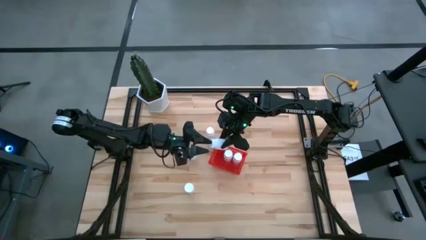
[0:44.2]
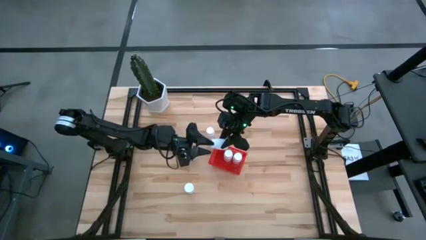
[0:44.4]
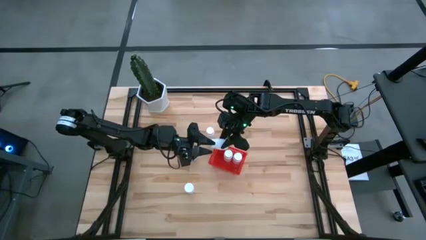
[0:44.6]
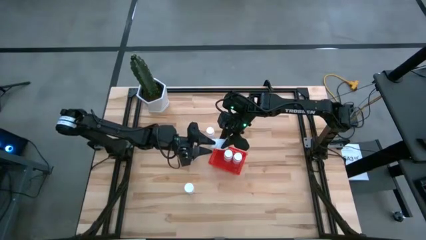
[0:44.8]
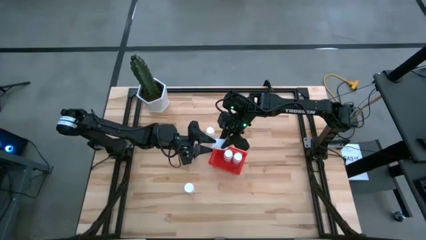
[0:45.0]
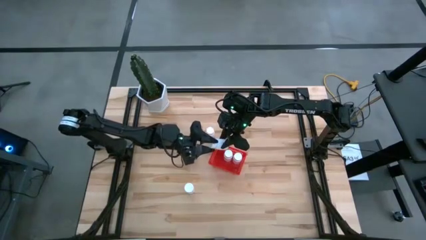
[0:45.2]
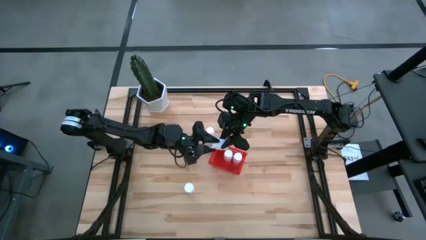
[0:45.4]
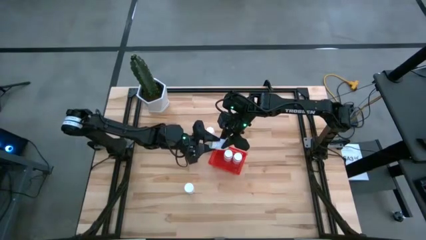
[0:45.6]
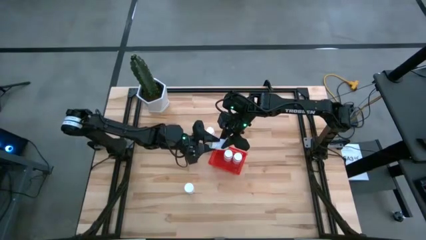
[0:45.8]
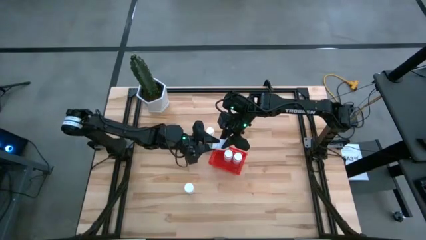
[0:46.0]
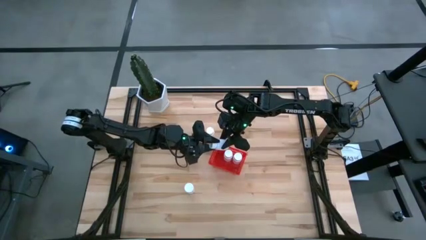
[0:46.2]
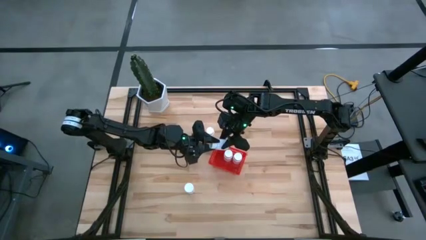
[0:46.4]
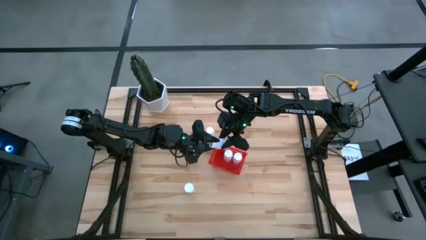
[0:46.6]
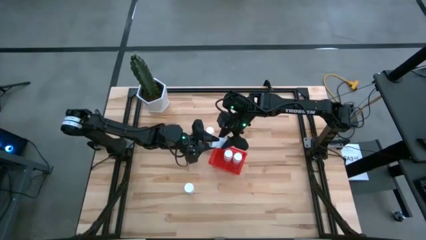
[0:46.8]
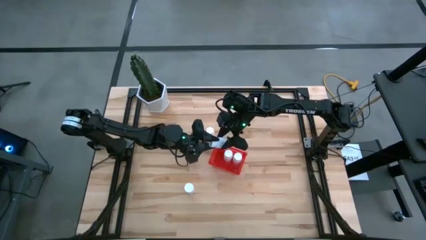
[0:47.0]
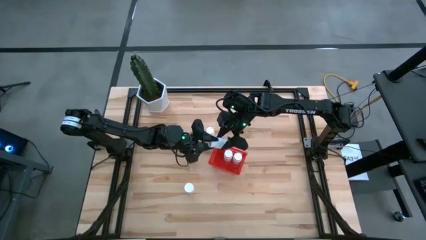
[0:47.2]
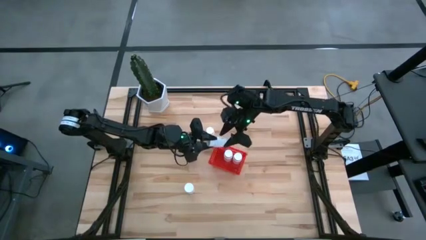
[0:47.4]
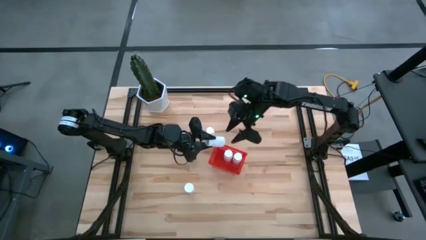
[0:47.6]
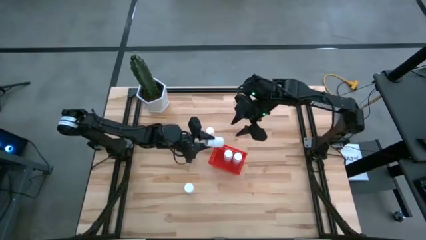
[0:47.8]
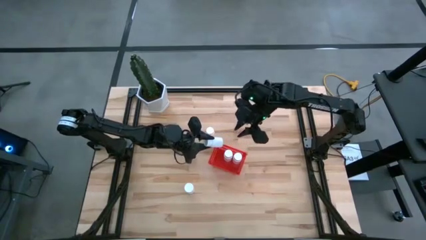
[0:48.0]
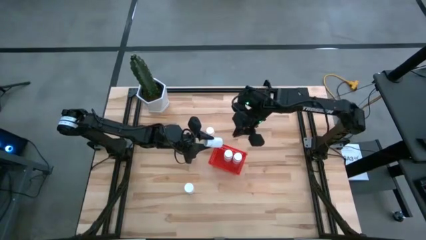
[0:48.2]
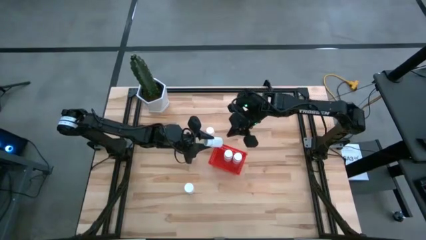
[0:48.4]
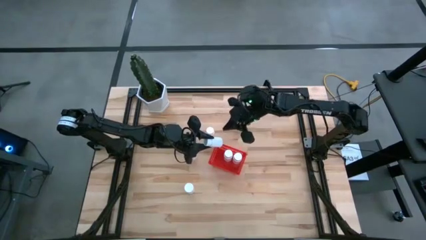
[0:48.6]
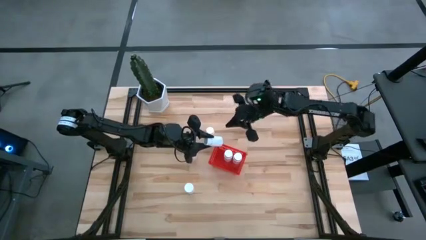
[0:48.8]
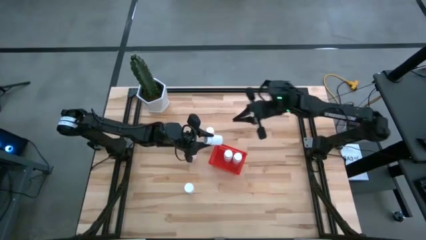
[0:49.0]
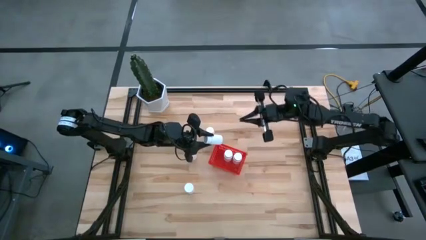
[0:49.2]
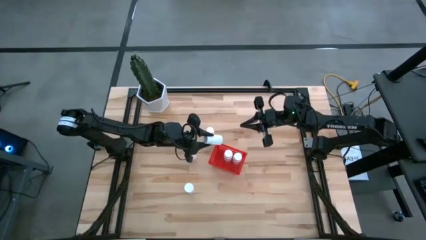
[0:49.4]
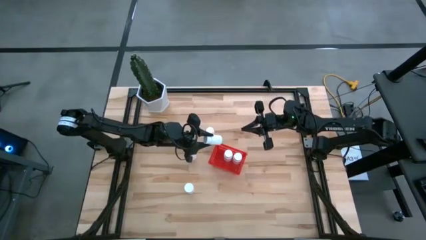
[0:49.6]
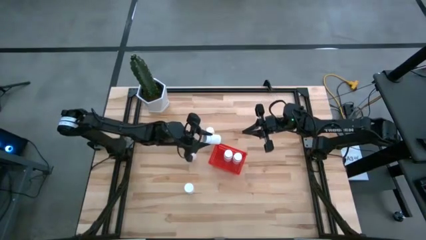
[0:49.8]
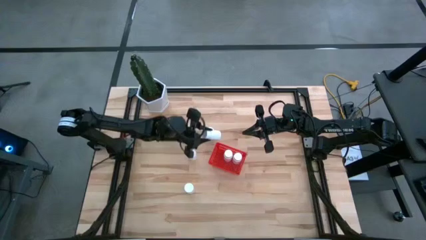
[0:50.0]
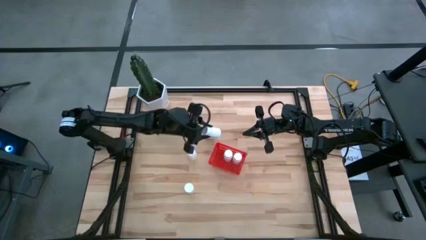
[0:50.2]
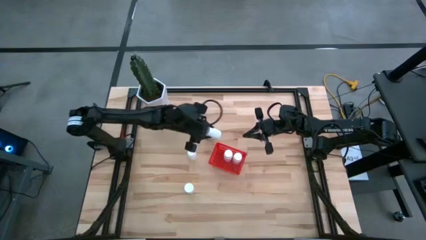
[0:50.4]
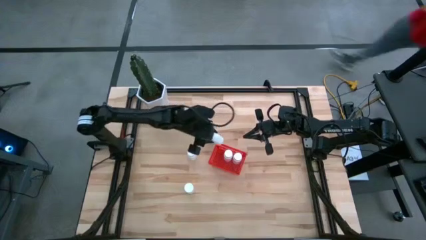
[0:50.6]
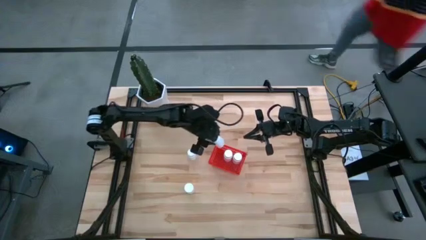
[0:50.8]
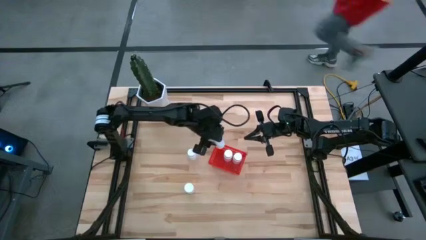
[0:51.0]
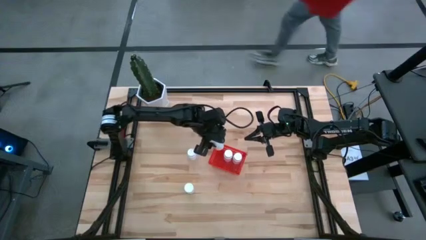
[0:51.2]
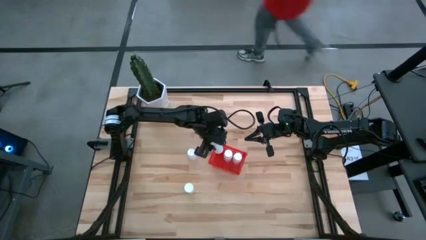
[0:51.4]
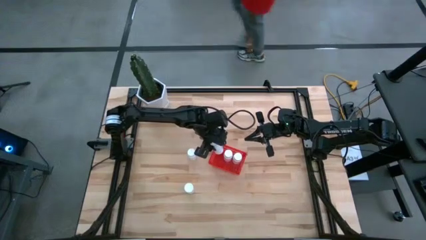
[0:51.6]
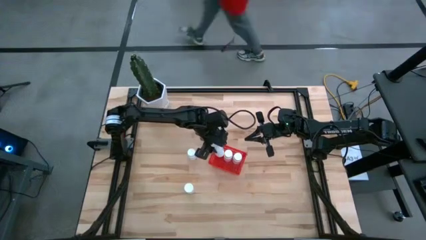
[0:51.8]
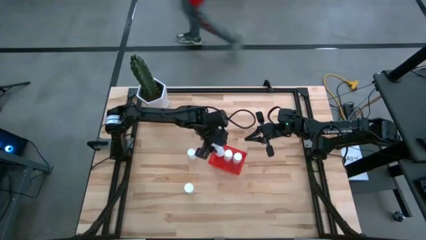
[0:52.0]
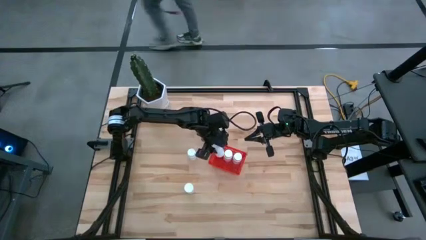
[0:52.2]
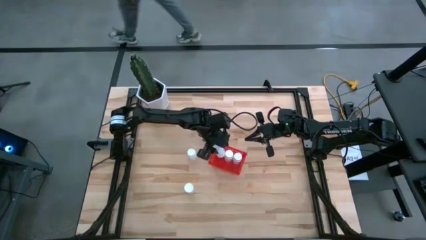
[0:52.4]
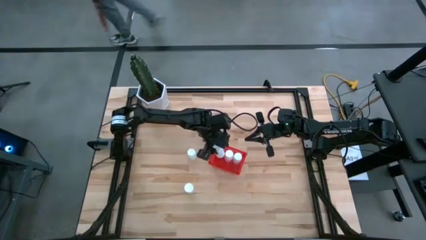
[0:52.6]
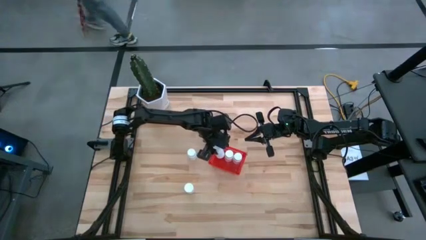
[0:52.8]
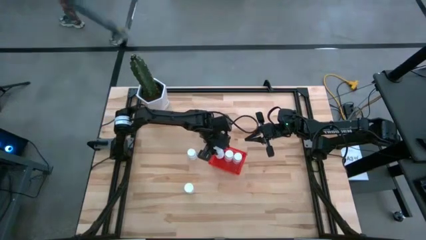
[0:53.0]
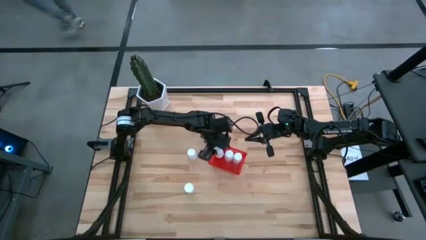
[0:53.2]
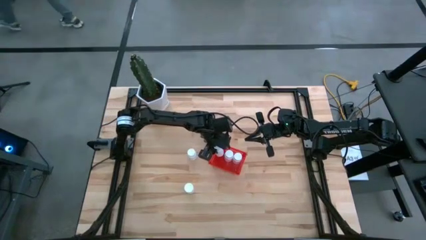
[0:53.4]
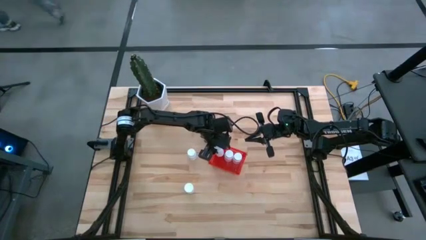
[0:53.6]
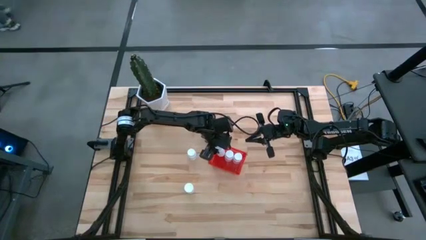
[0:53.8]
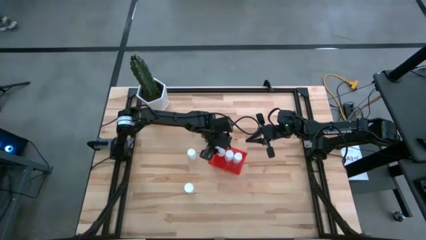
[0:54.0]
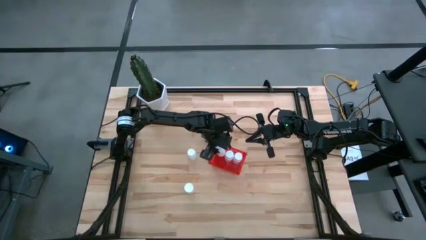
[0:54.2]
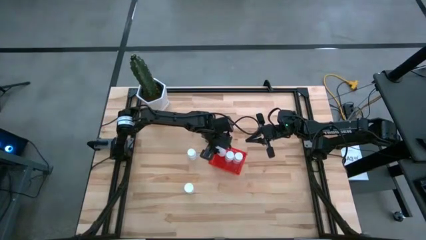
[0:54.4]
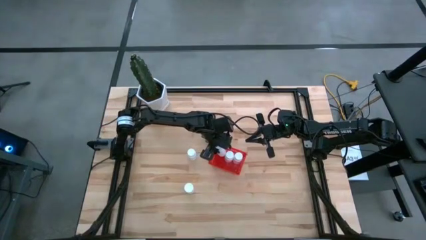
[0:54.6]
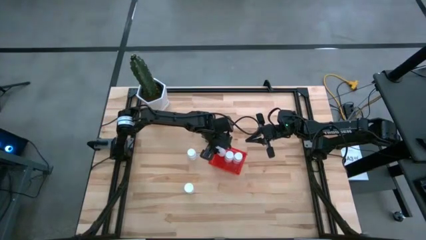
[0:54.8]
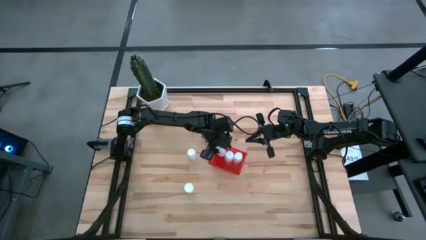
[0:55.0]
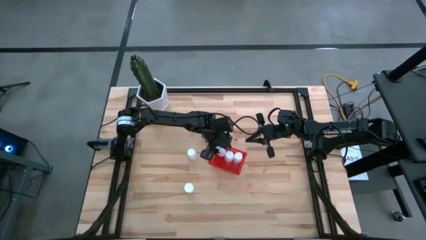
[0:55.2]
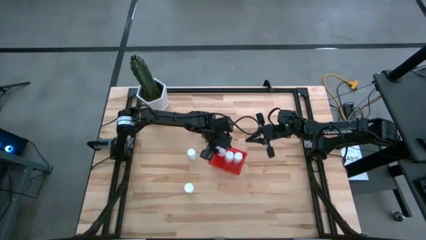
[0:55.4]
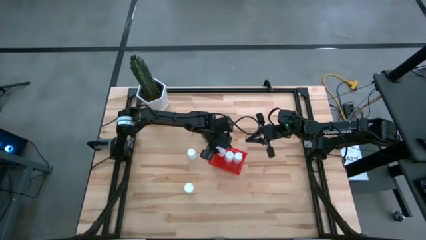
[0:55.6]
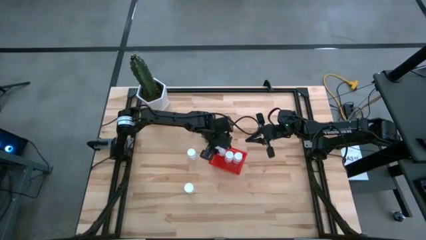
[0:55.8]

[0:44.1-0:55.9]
Task: Pick and place pill bottles into a basket
Put the white pill bottle into the red bin
